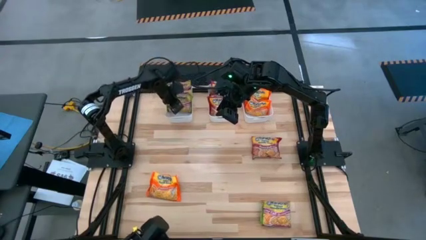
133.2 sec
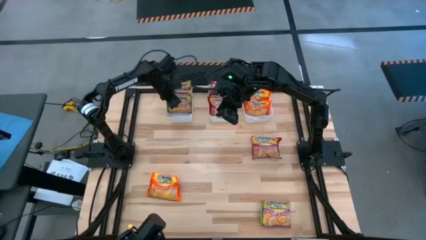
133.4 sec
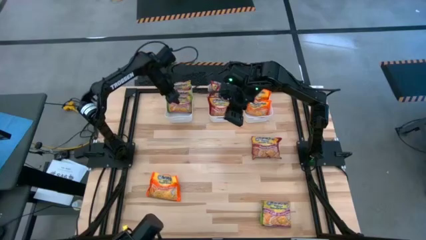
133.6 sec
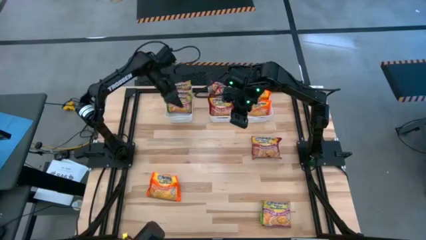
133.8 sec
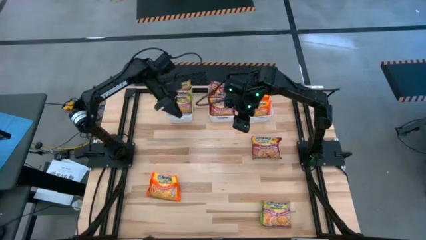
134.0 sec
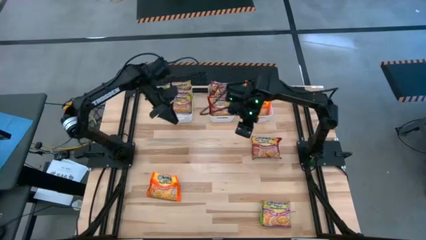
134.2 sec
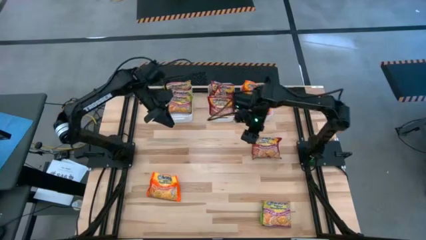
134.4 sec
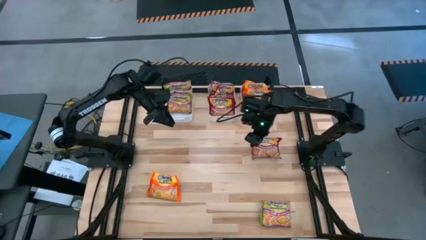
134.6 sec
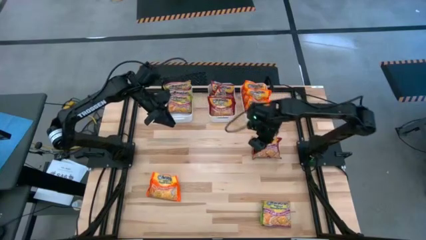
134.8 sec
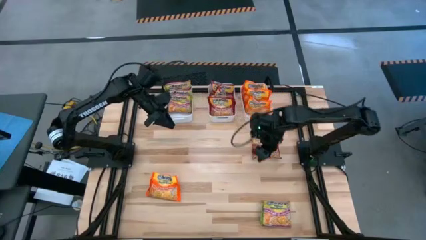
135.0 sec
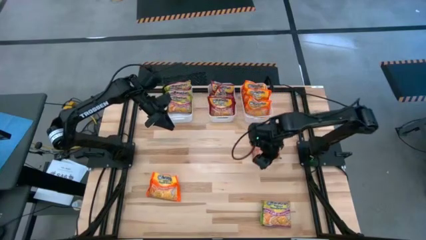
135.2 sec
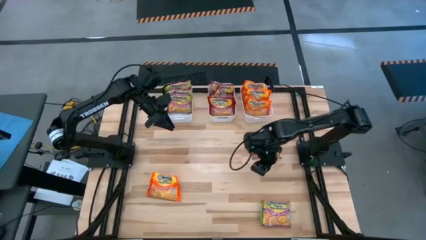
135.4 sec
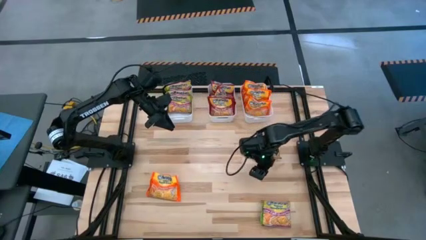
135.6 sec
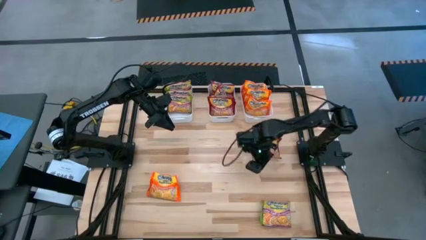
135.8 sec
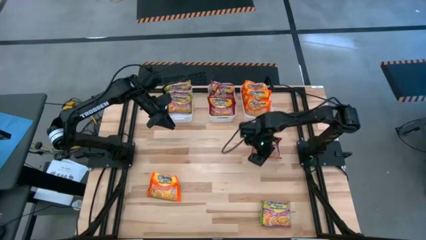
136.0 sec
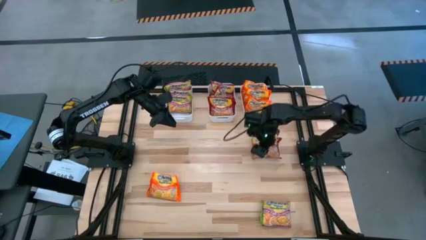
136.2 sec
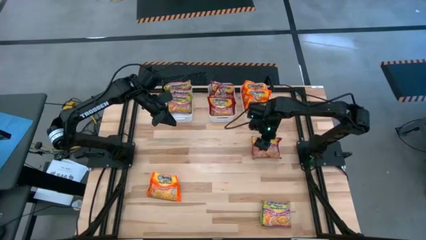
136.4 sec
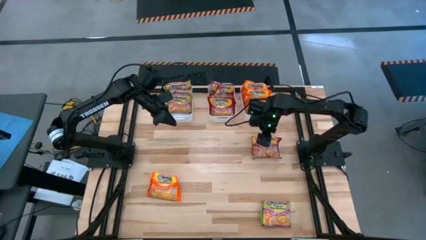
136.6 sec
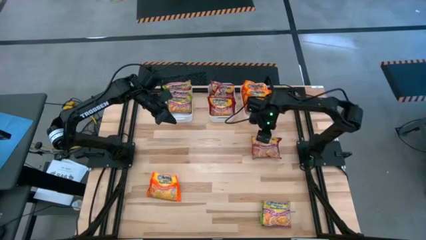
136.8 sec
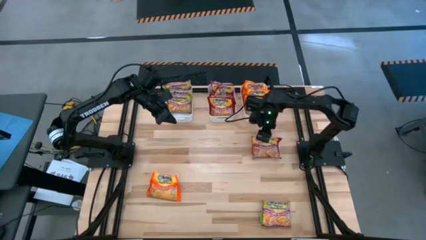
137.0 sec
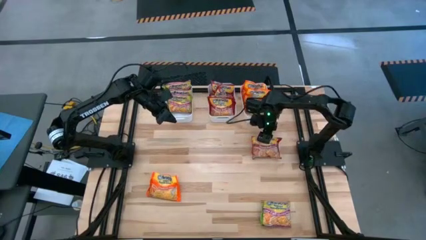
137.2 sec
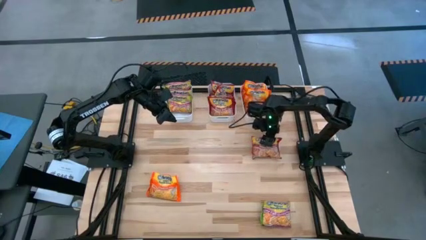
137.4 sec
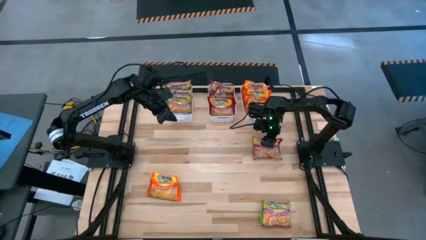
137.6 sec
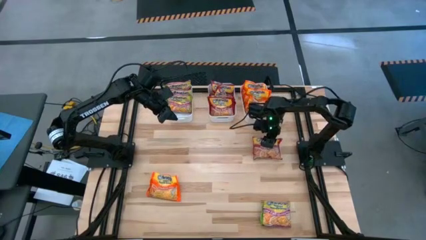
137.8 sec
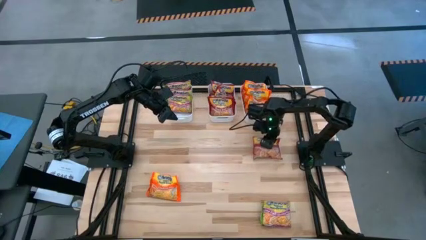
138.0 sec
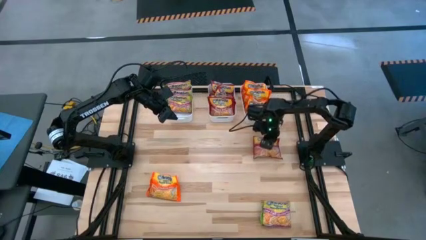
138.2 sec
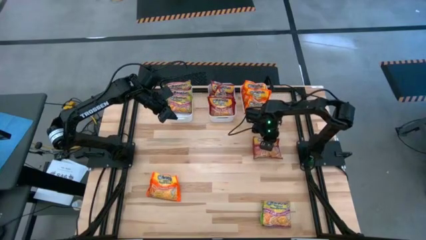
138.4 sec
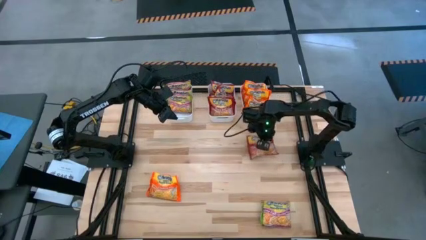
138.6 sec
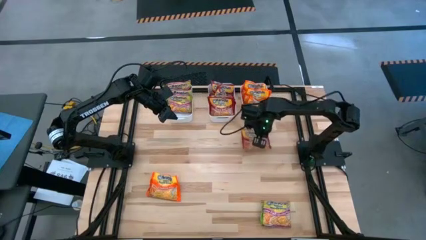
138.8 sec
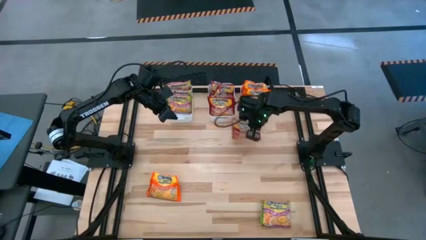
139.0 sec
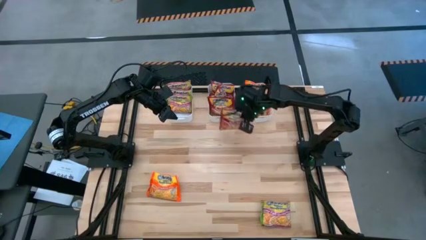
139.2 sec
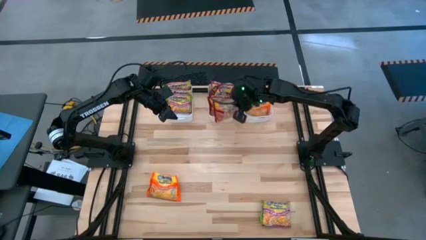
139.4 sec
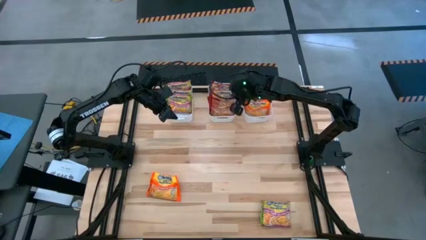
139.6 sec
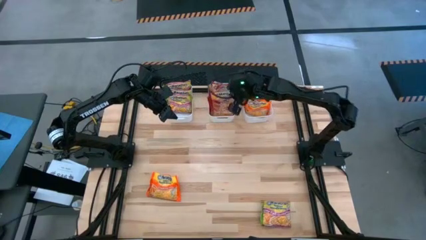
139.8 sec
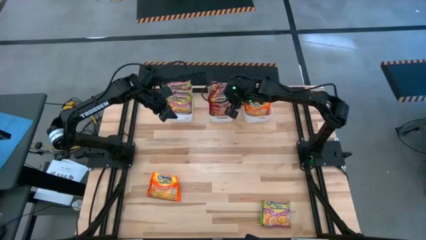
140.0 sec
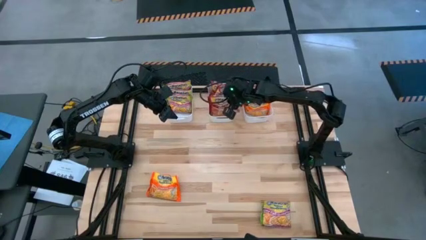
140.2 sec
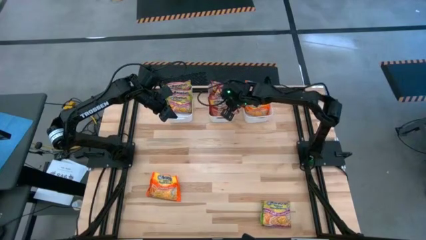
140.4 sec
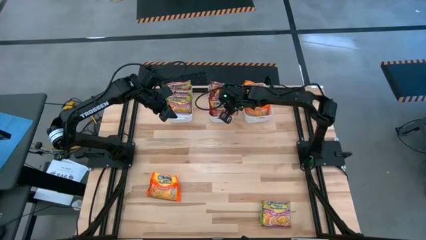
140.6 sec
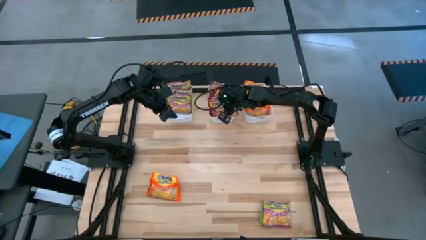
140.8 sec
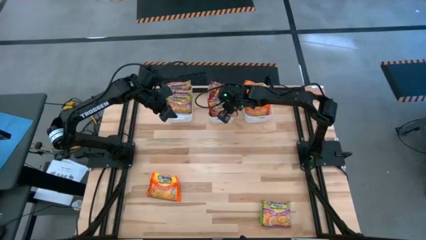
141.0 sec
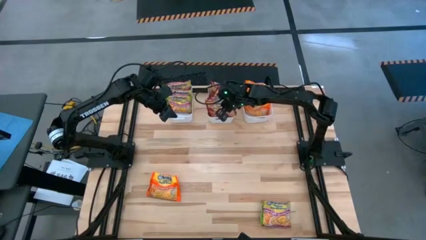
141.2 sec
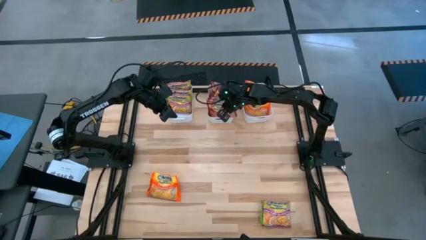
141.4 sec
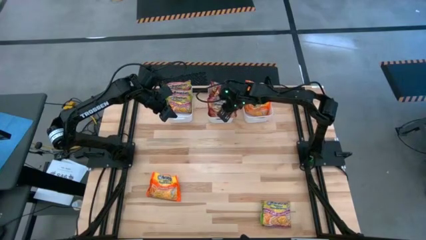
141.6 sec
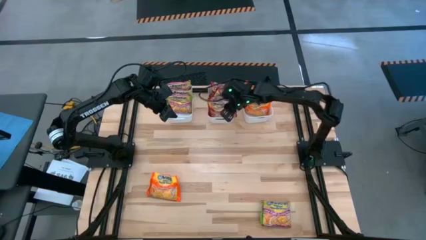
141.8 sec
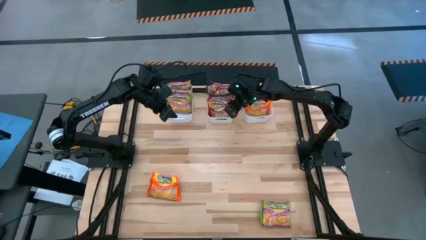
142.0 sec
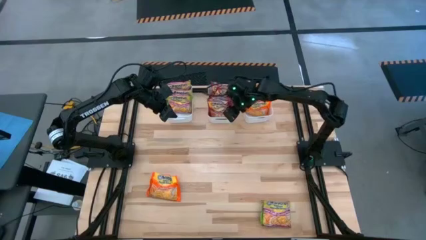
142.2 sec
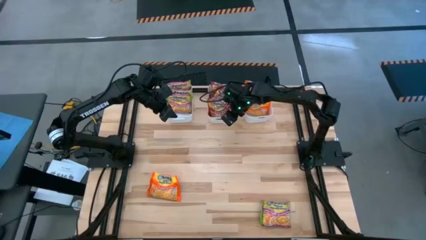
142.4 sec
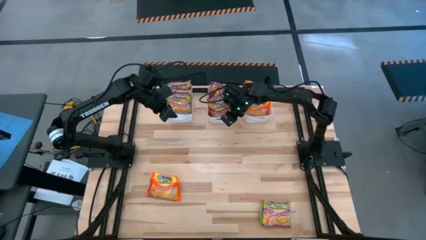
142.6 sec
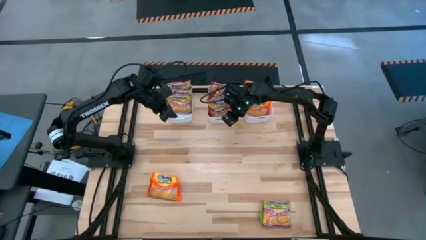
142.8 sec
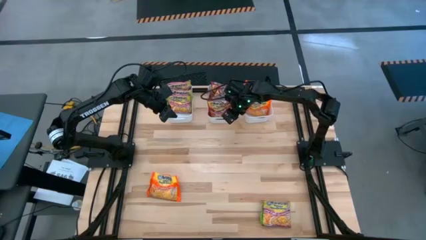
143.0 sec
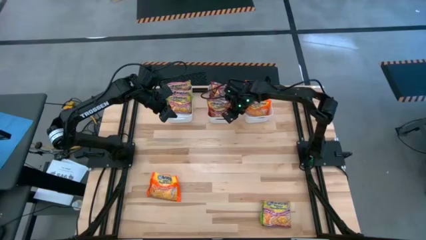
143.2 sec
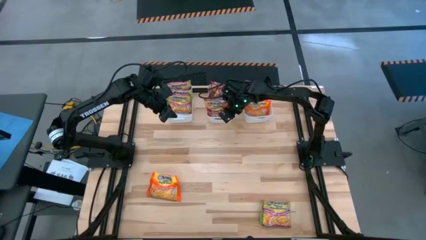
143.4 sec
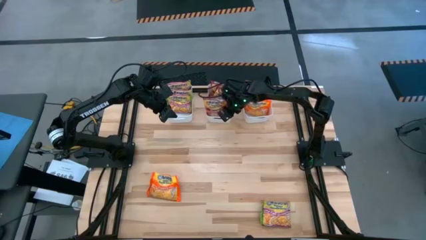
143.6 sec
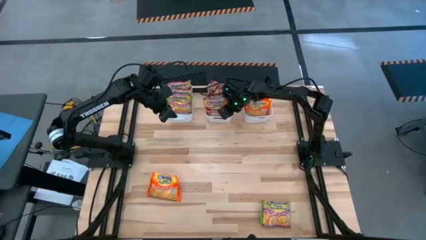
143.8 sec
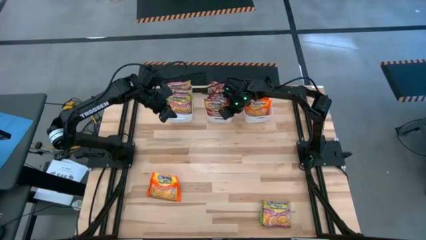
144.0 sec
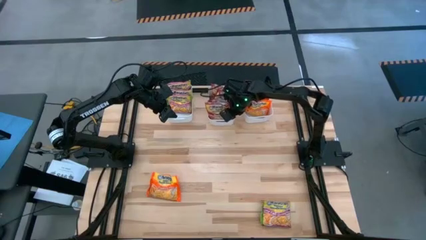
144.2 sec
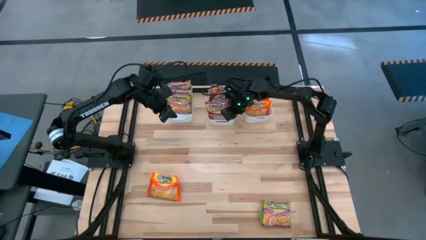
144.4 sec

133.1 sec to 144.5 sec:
Task: Sort Maruchan noodles
Put the red noodle pack into the center white bin

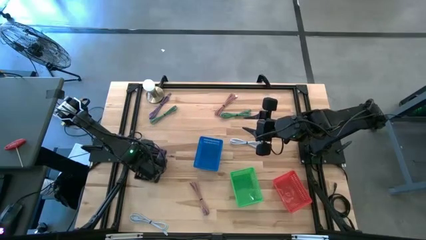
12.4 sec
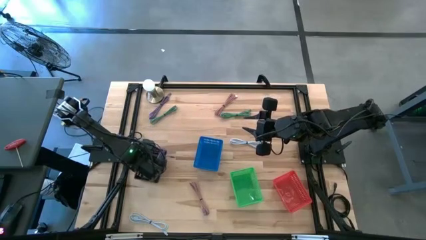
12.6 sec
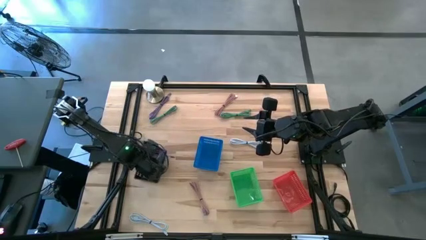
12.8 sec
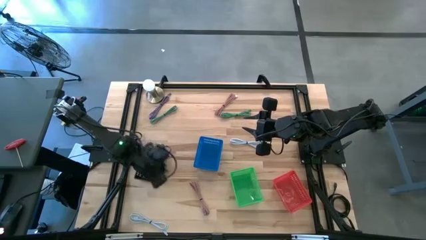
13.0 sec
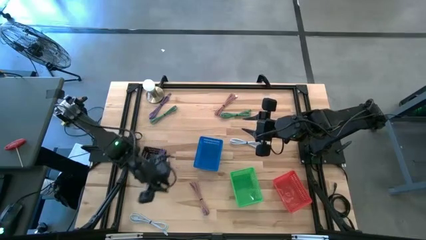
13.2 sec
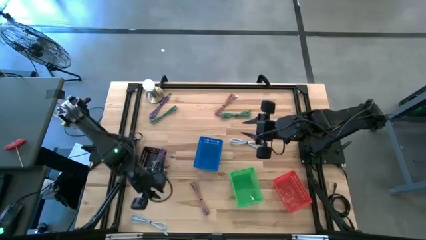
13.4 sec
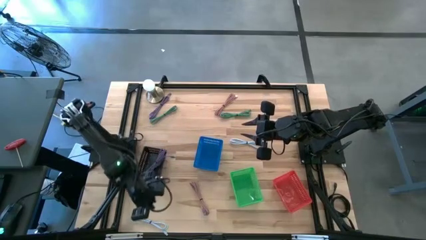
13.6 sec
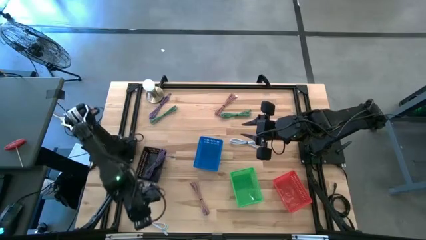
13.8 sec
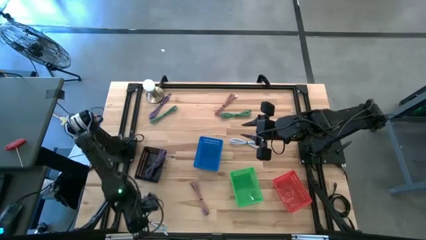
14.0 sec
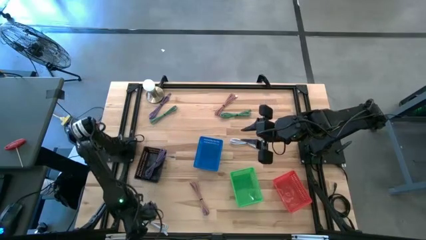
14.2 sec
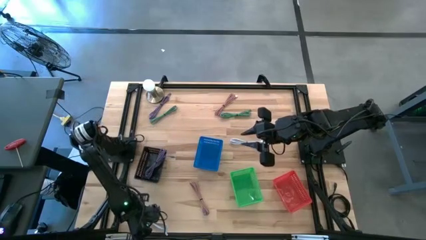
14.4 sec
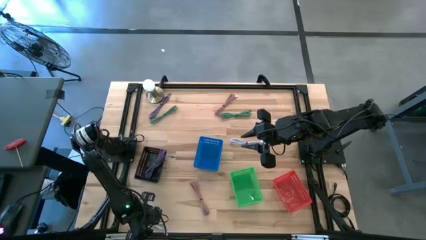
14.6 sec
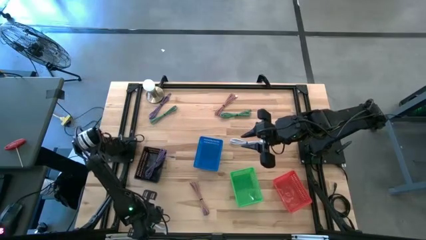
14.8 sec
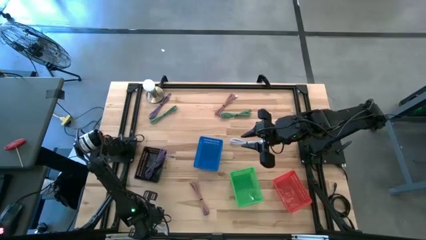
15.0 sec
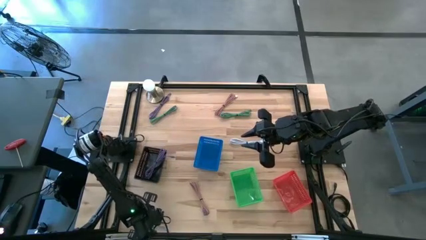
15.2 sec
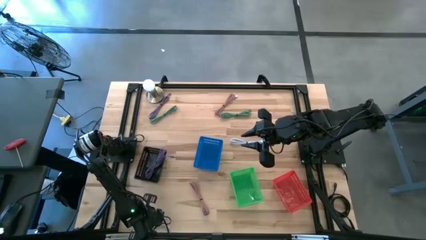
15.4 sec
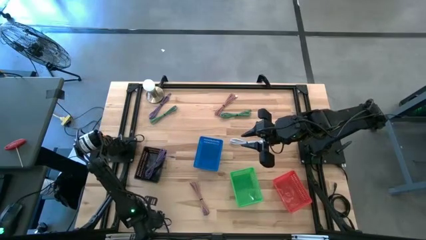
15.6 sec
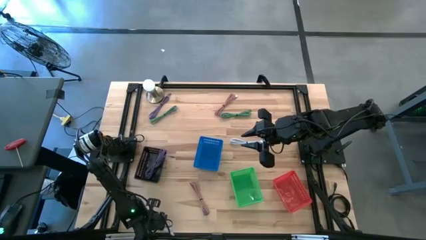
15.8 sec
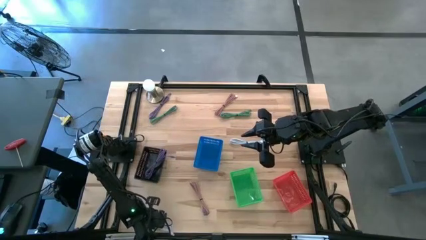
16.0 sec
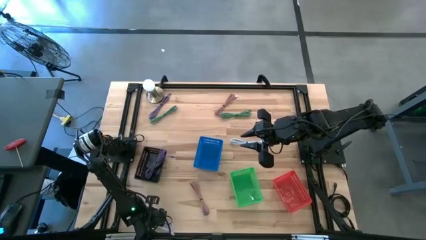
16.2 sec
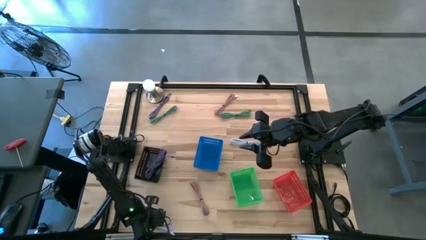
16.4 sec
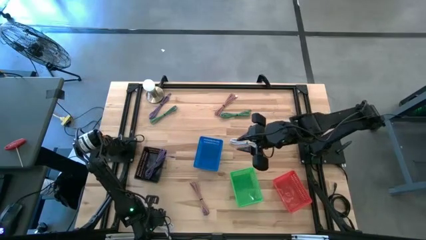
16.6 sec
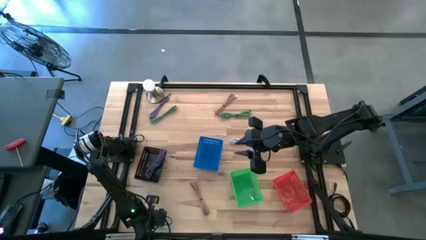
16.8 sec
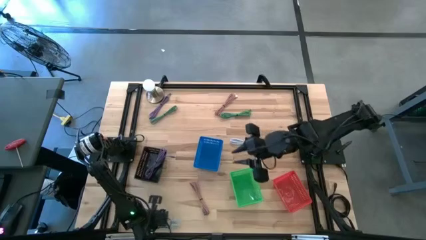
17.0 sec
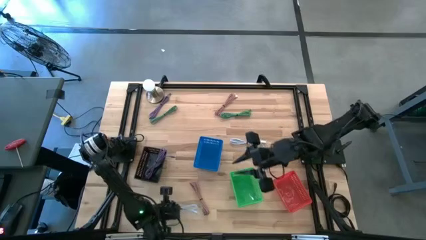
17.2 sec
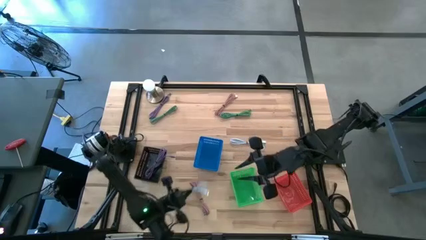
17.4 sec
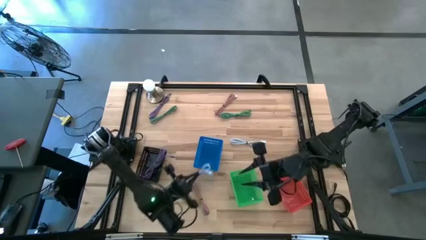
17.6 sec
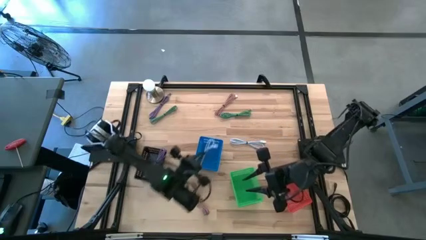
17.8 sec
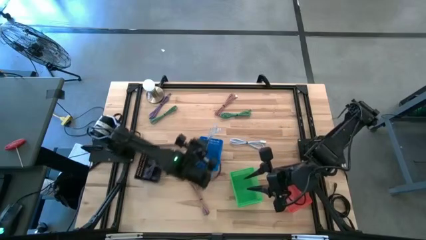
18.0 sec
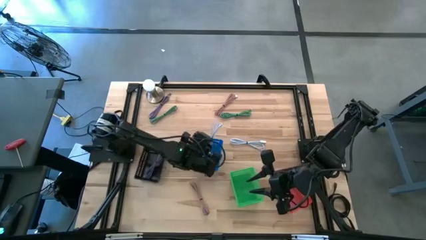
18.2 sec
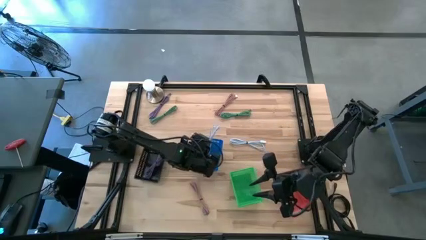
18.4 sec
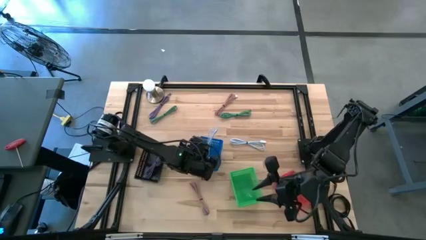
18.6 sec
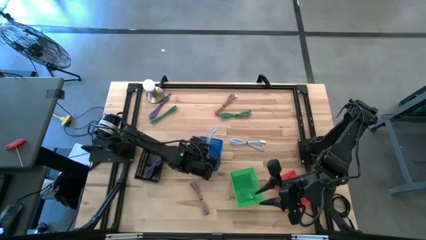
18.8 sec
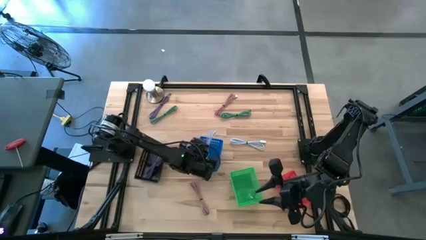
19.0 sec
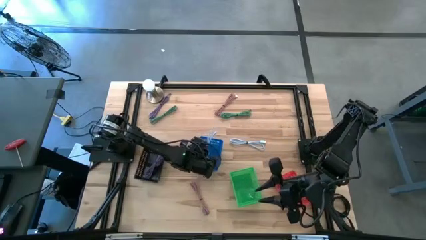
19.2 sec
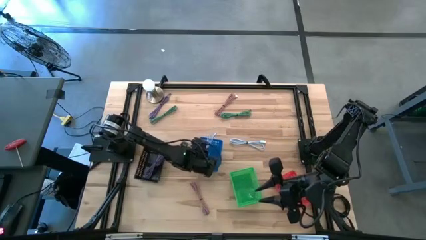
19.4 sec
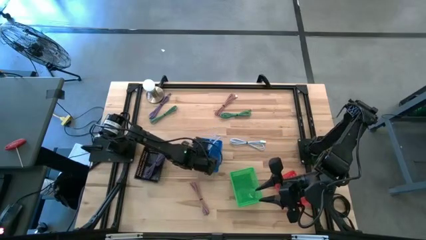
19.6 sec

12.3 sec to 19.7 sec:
Task: Pick & Place USB Port
Put the bottom light blue USB cable into the blue bin
